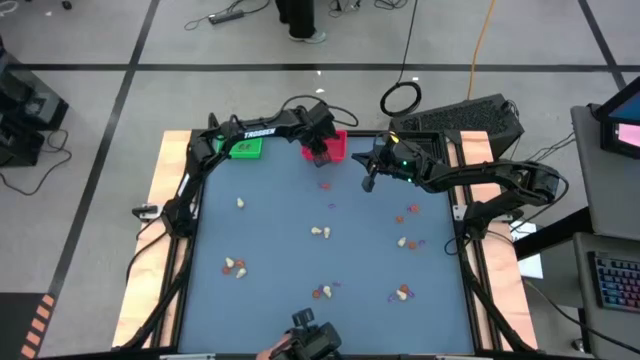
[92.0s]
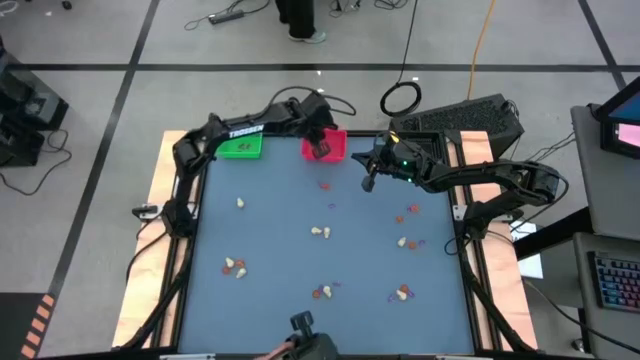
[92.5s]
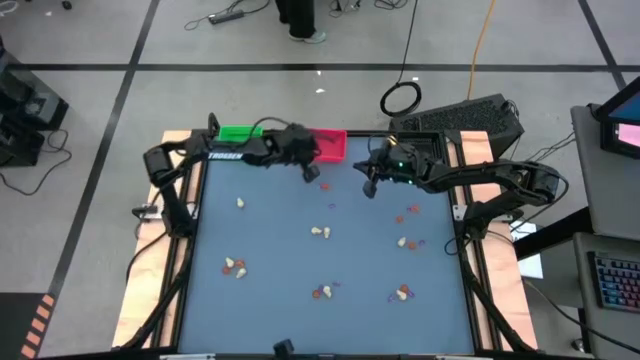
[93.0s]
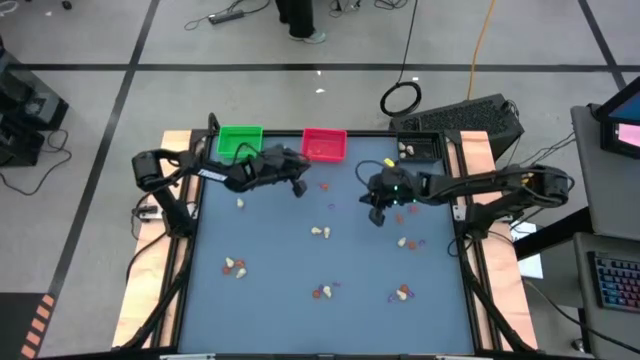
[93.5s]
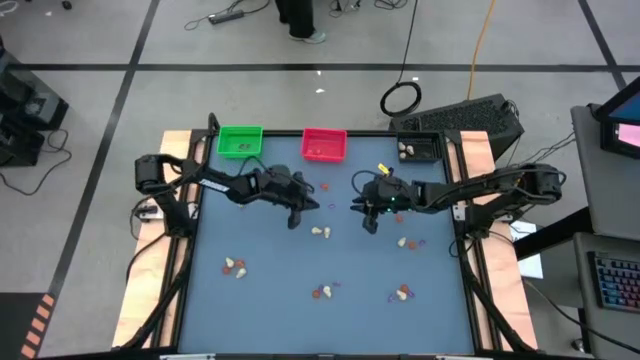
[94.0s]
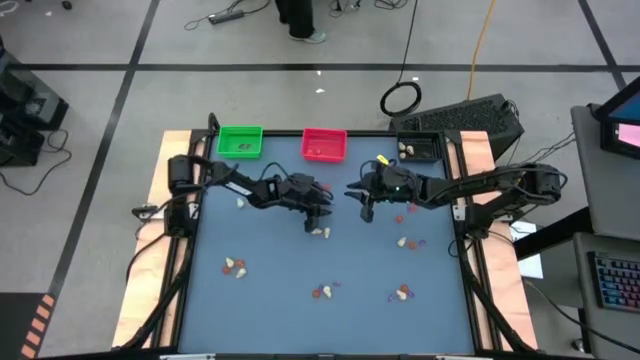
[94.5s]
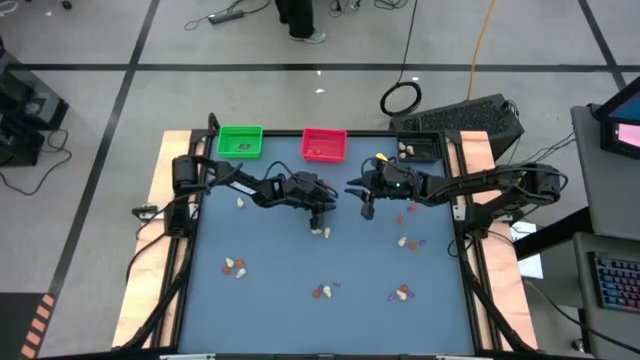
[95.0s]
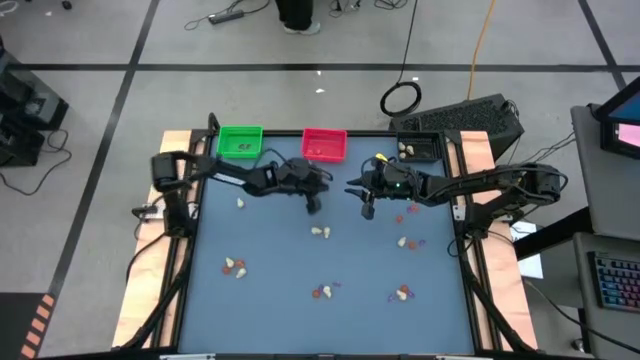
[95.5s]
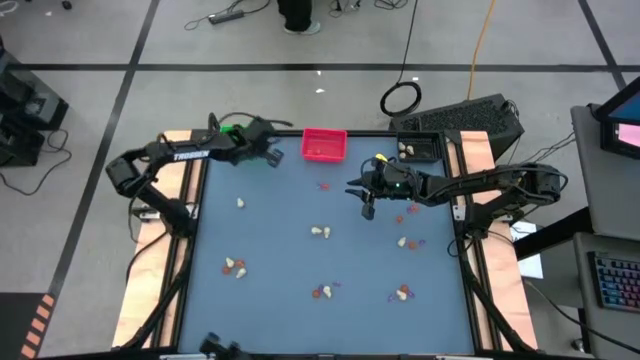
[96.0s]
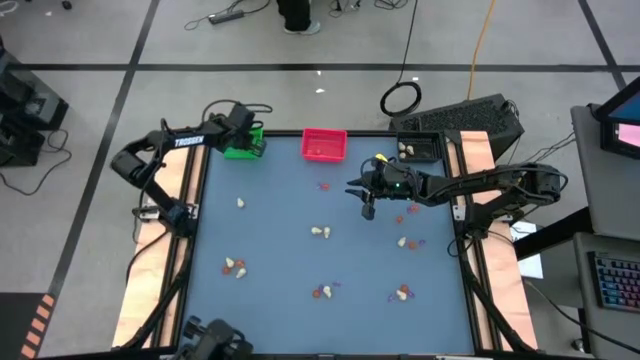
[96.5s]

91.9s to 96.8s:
Task: Sort Halloween decoration
Put the purple witch hat toy into the green bin

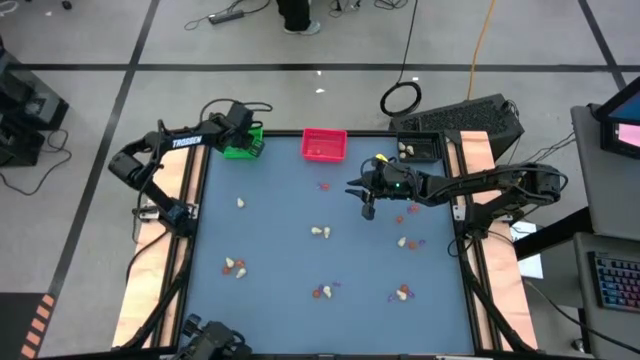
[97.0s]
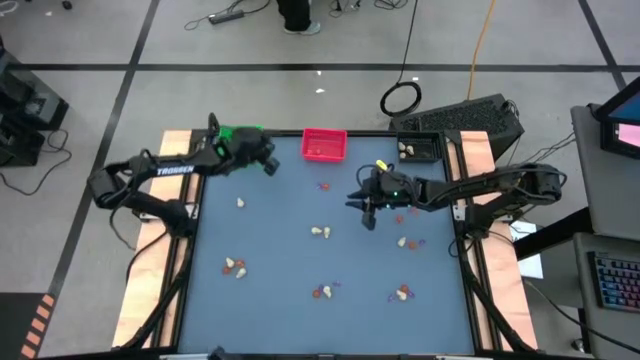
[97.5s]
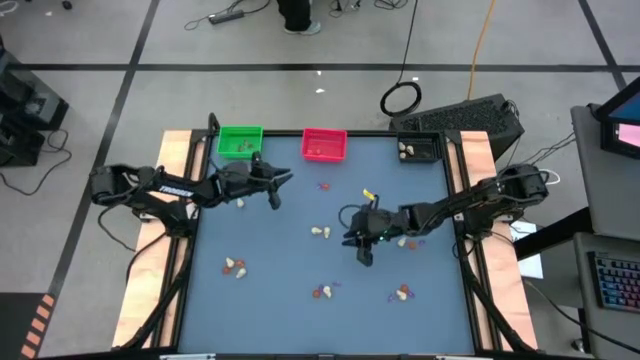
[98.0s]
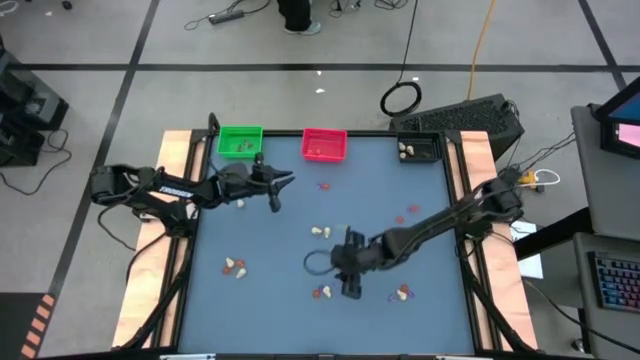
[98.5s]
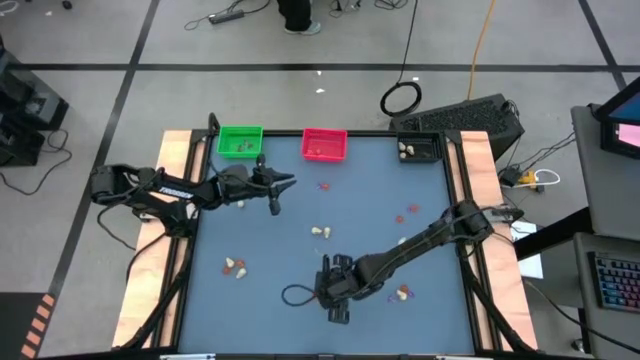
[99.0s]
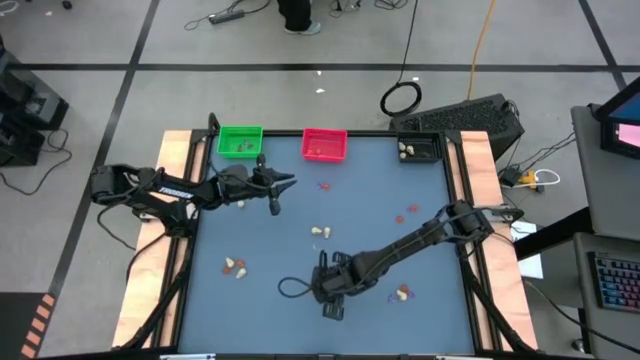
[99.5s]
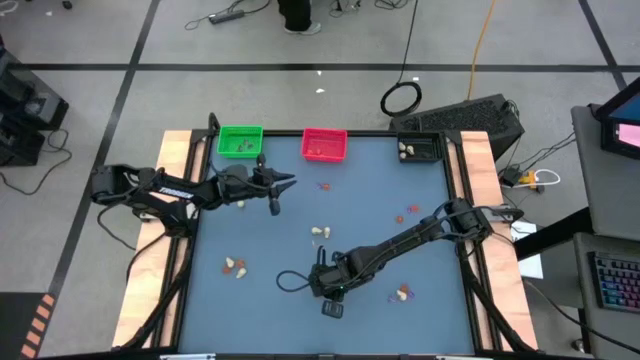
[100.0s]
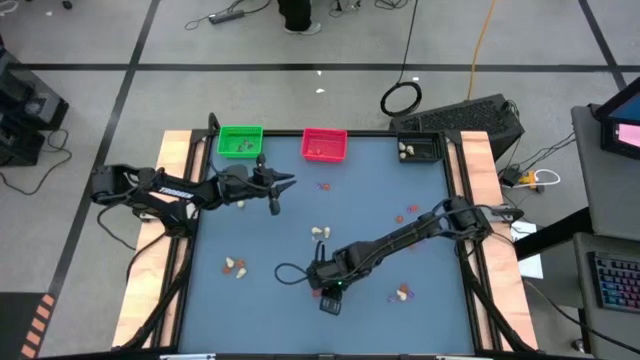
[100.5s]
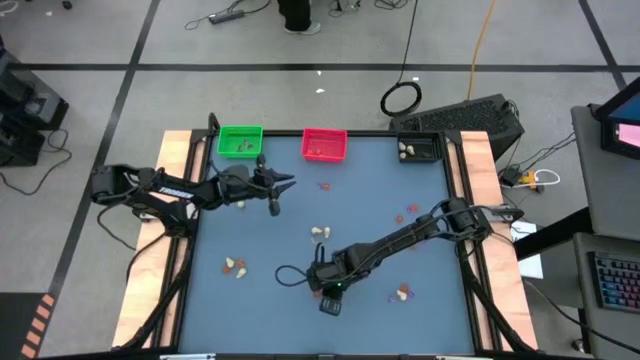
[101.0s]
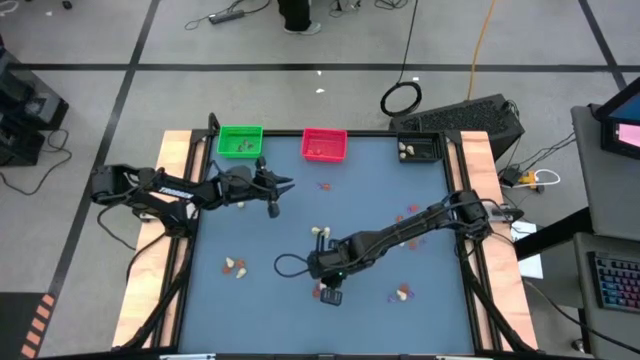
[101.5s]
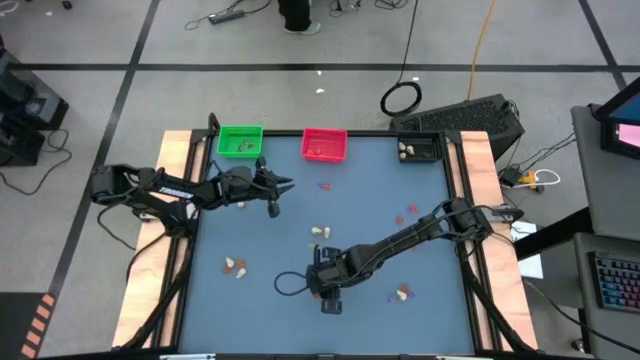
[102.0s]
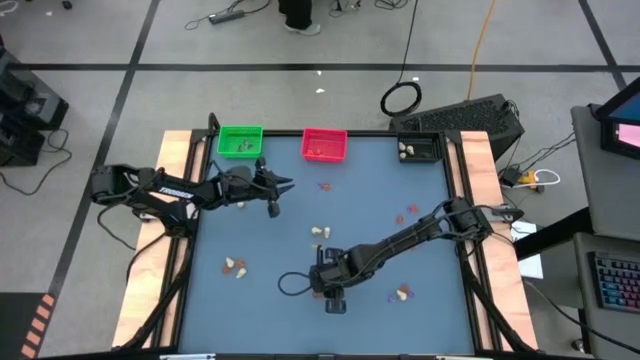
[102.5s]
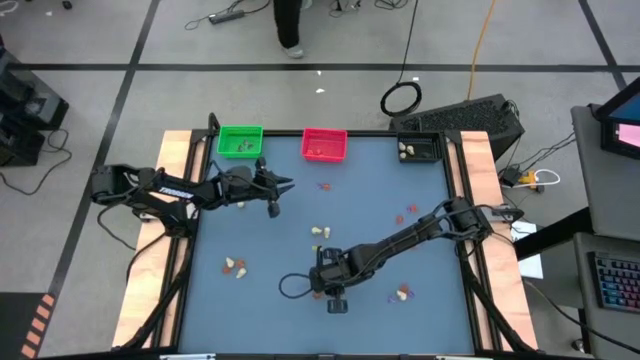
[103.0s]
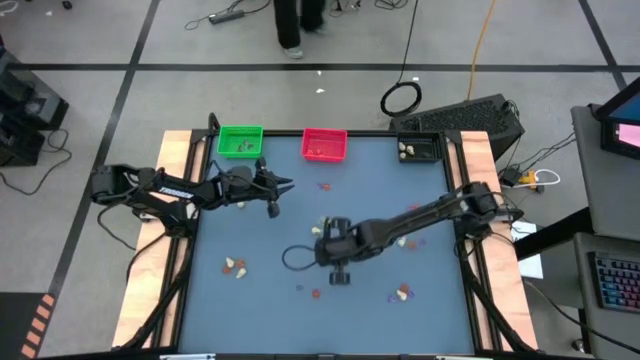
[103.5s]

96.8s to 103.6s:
Put the white skull toy into the black bin

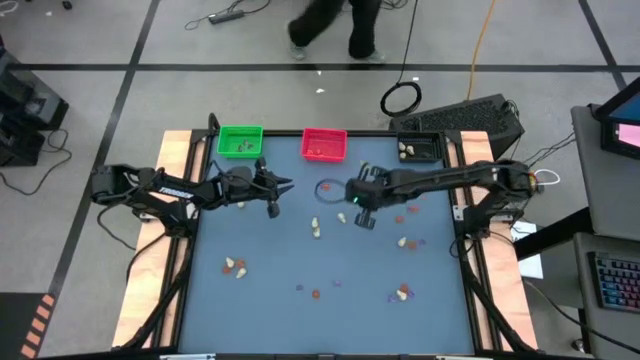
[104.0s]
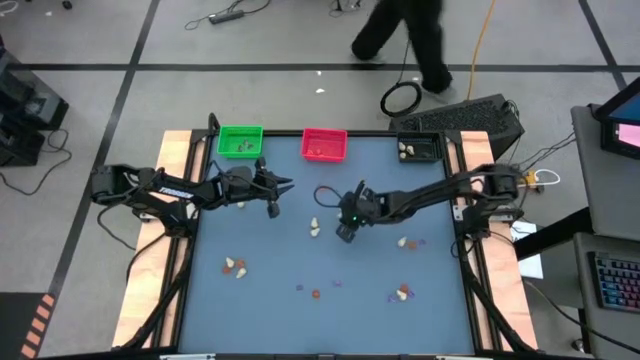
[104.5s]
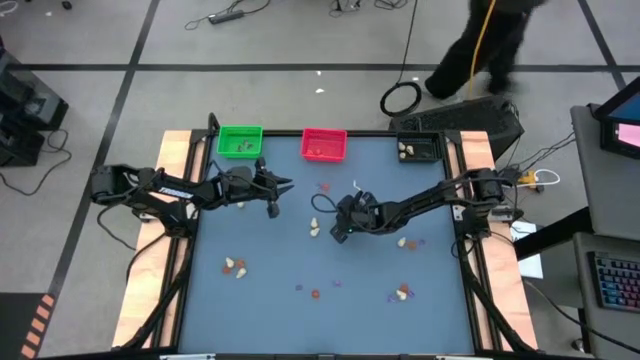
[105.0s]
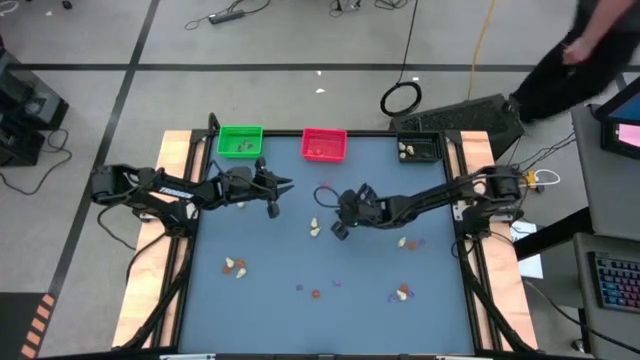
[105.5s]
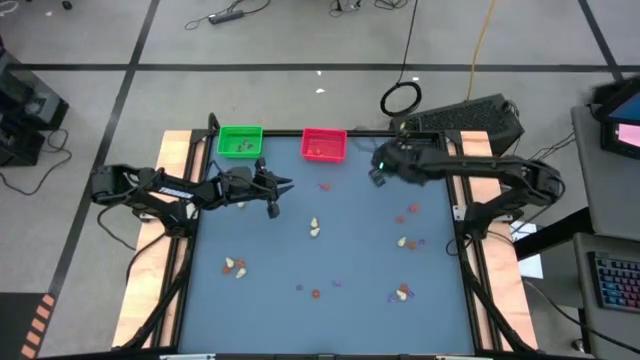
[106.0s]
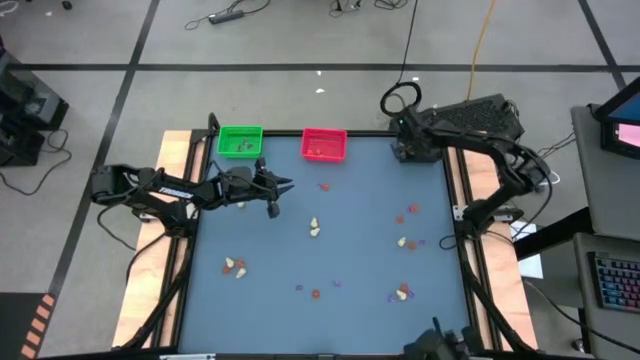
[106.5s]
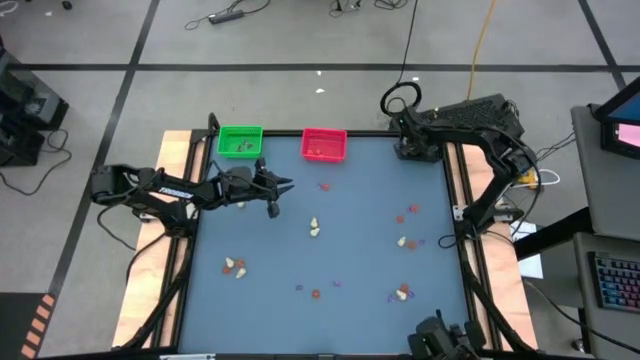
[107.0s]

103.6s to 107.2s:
Put the white skull toy into the black bin

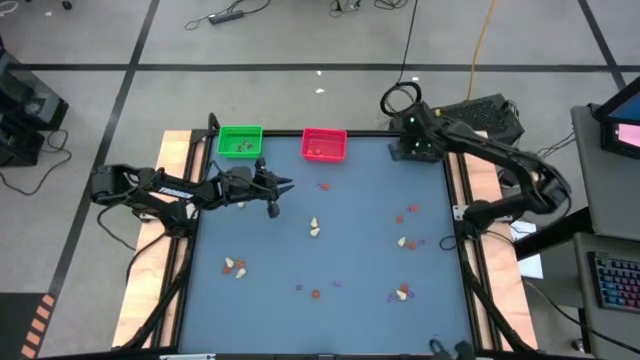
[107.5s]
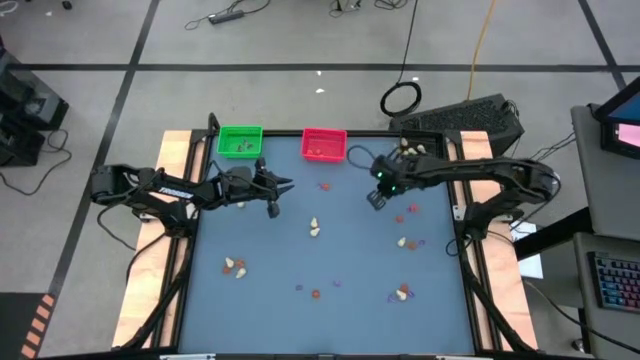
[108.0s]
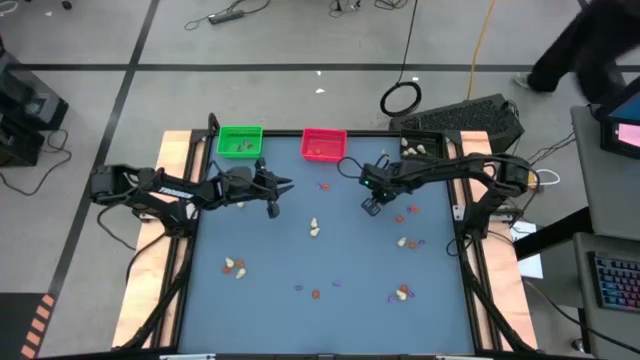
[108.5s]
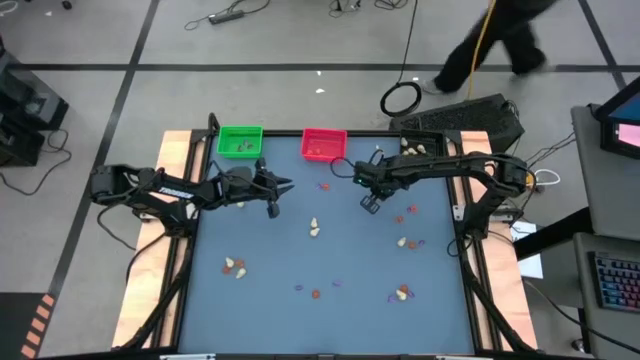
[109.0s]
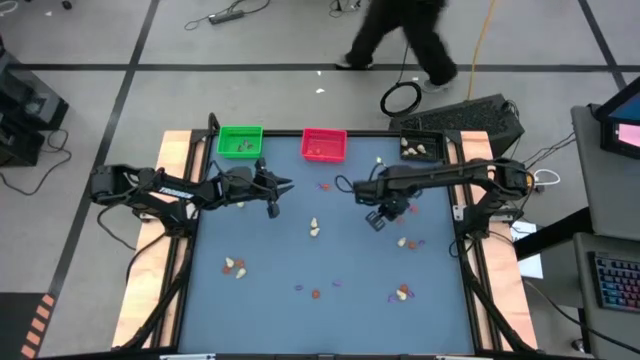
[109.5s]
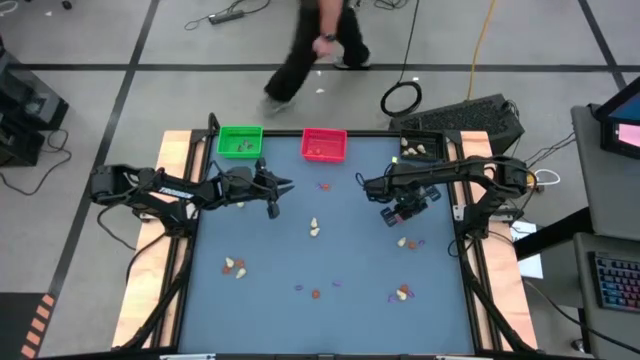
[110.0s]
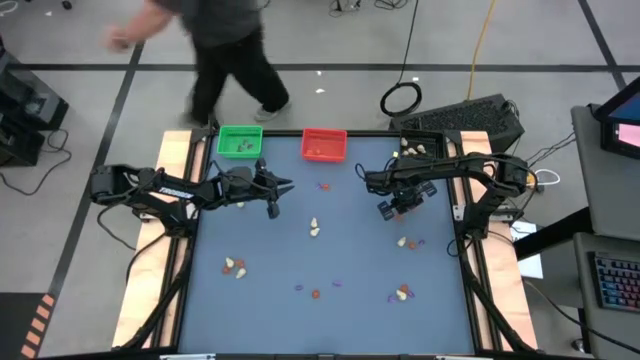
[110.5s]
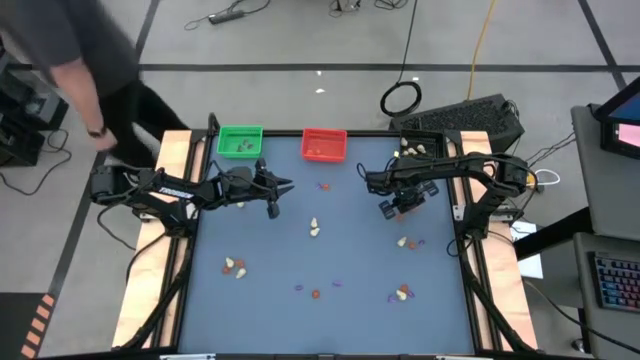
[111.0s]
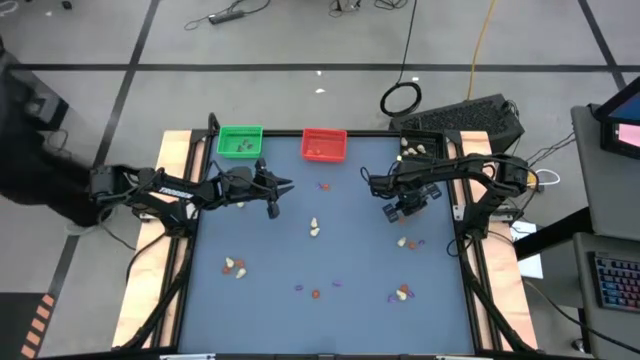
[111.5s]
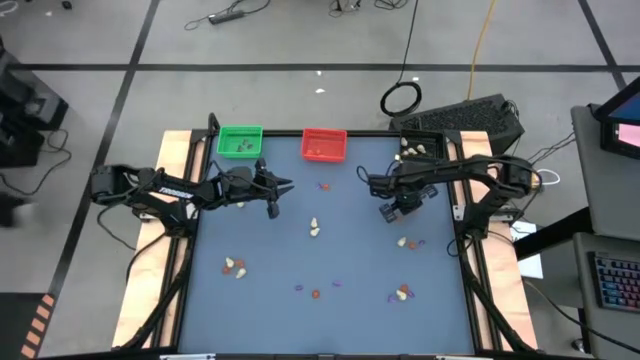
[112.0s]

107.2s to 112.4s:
Put the purple witch hat toy into the green bin

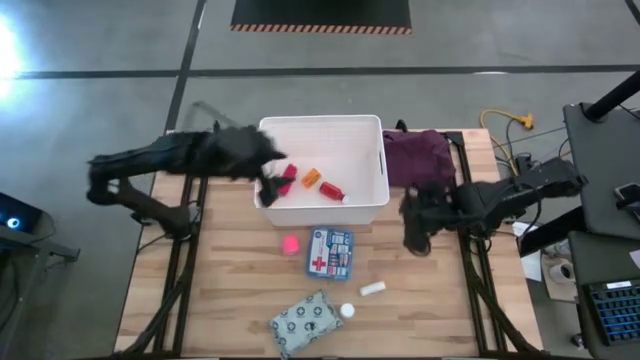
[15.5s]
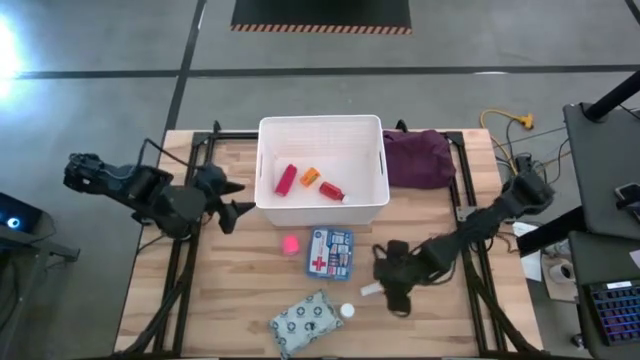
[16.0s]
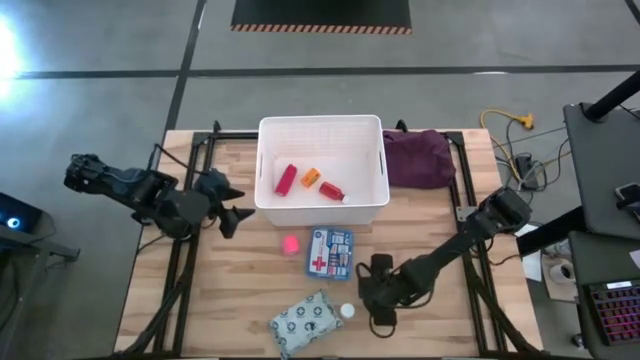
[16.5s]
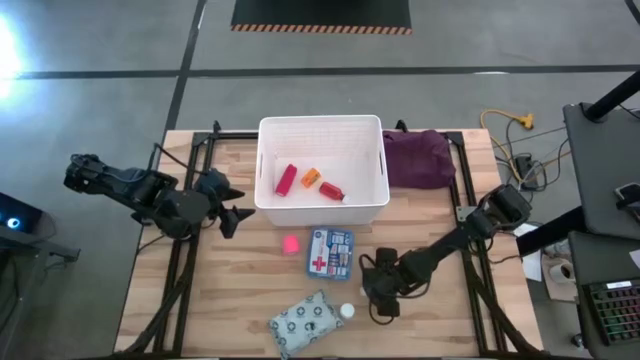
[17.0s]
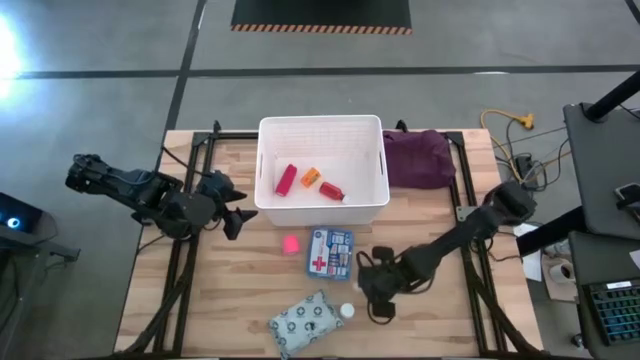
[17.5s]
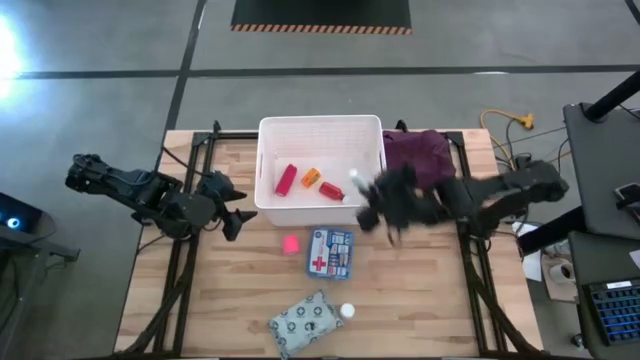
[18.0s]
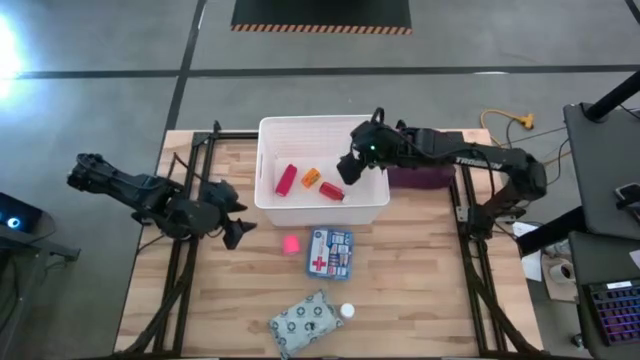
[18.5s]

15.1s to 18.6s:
Task: Pick & place medical supplies in basket/bin
Put the white rolled gauze into the white bin
